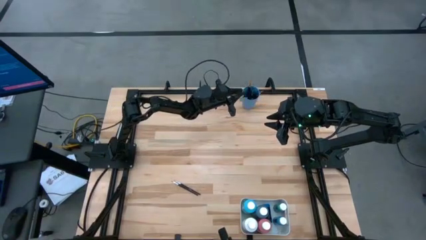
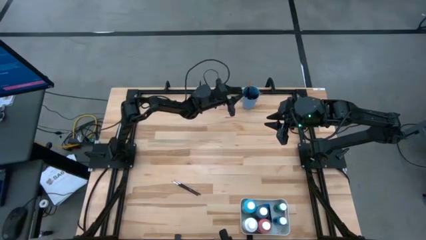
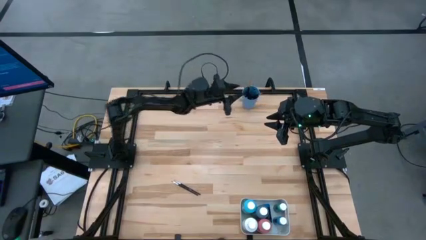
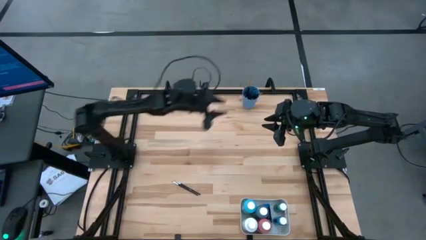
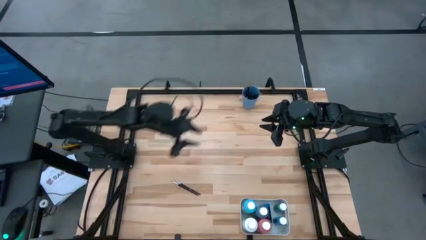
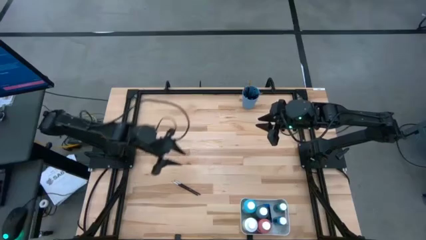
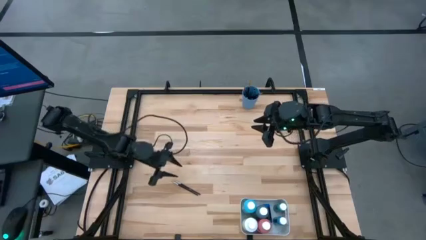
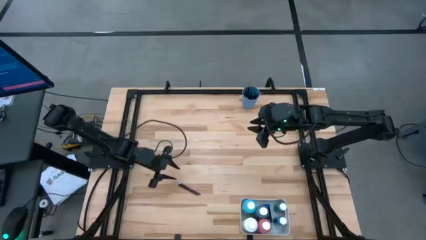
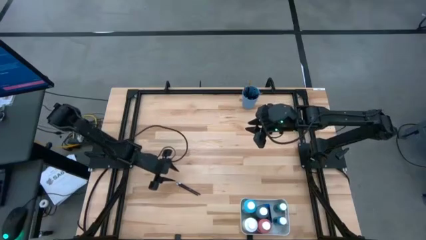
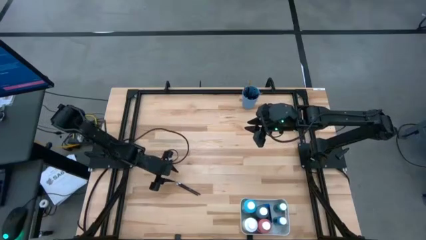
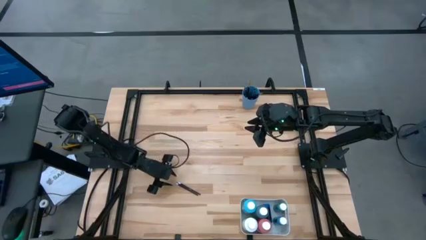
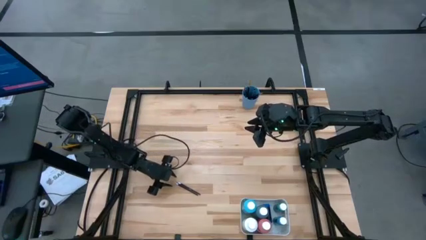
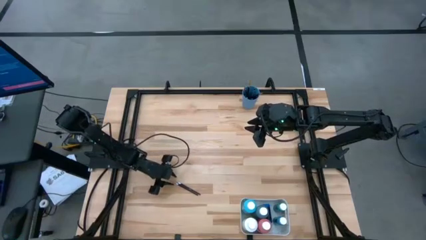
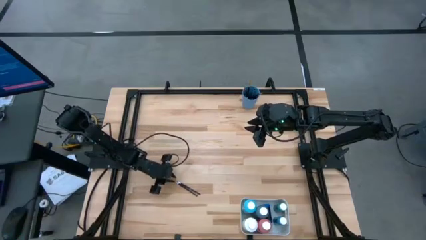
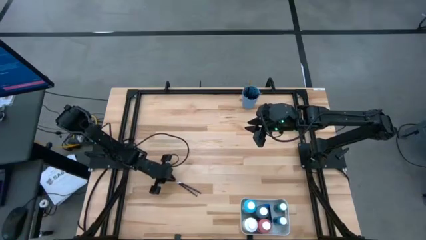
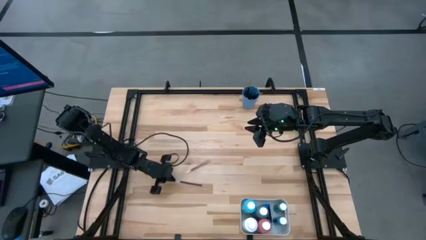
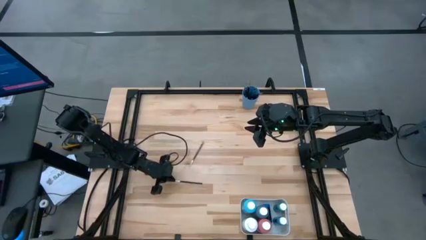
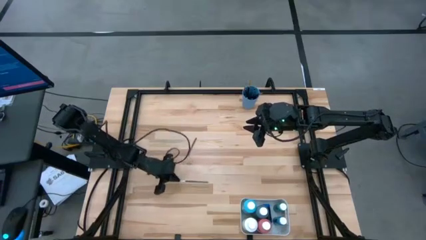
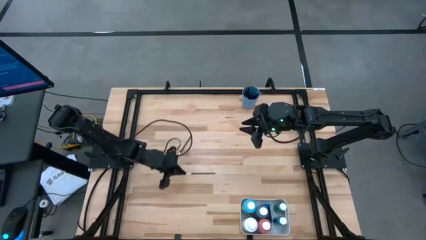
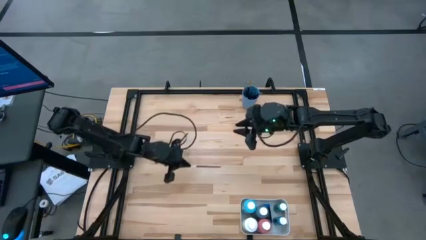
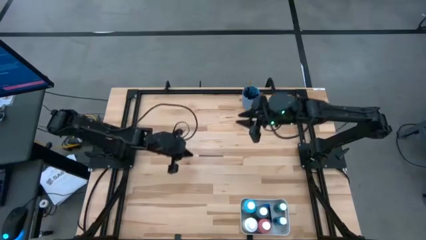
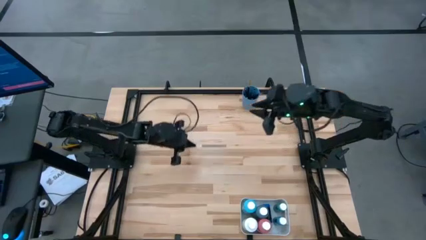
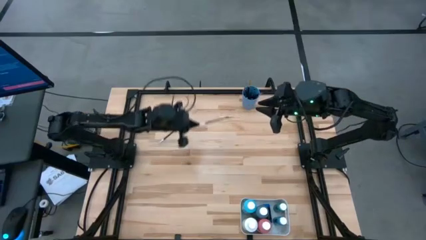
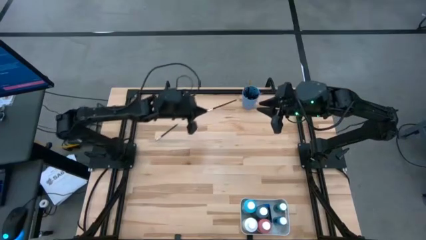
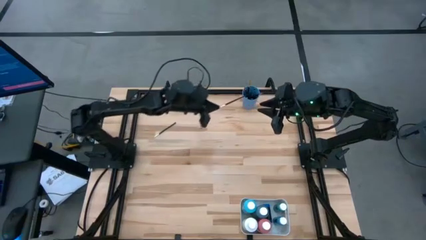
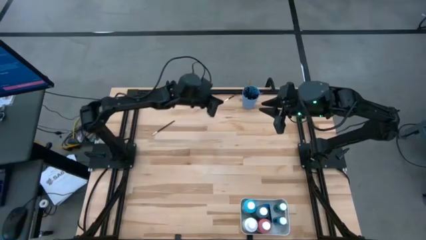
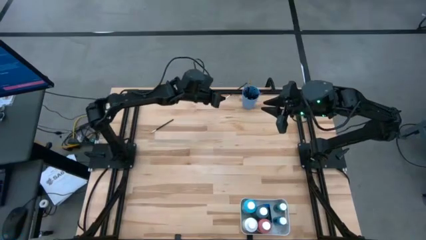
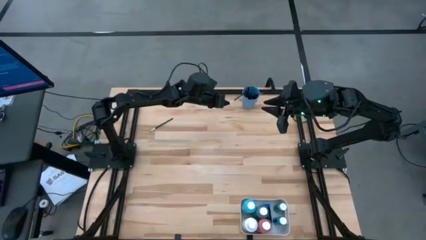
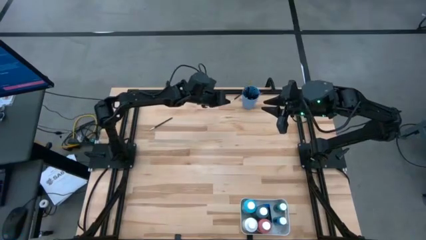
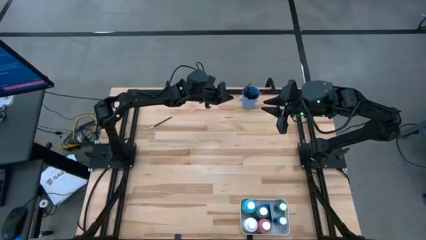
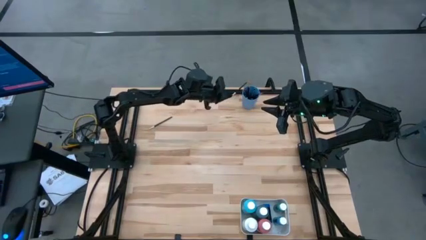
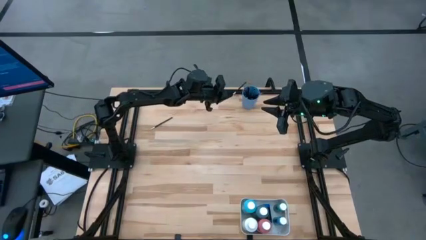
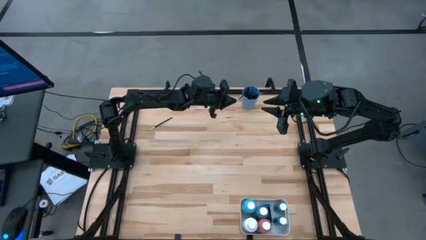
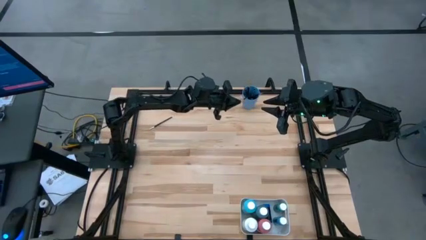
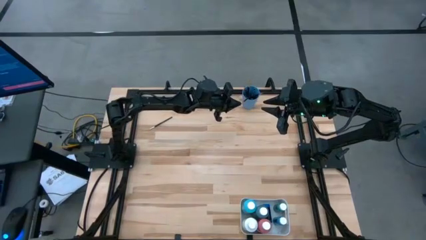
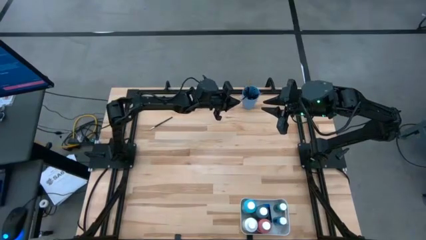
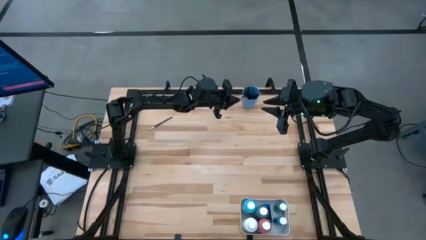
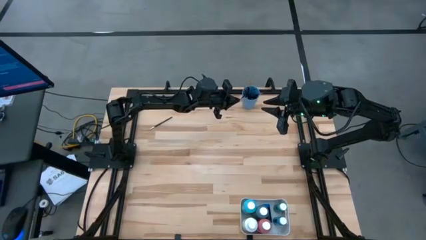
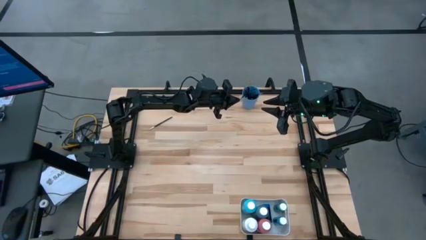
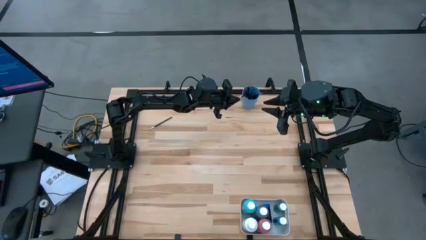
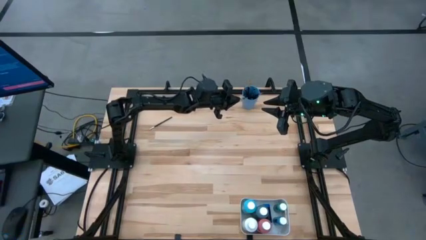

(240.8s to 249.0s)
Task: Pick & Place Paint Supplies
Put the silver paintbrush into the blue cup

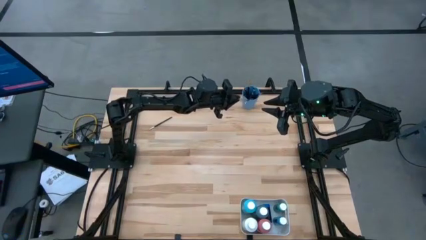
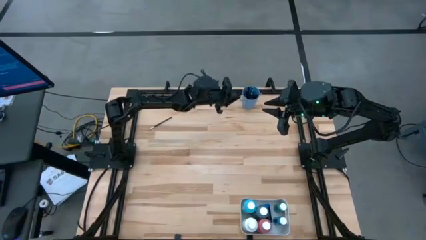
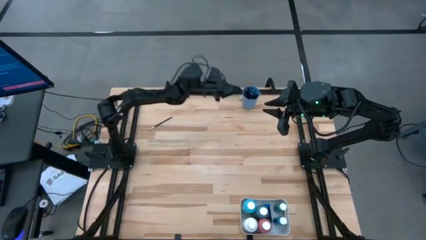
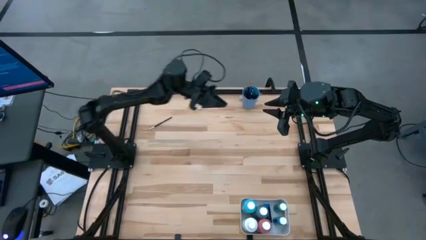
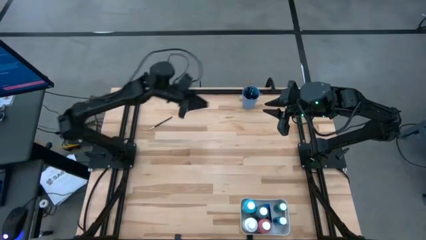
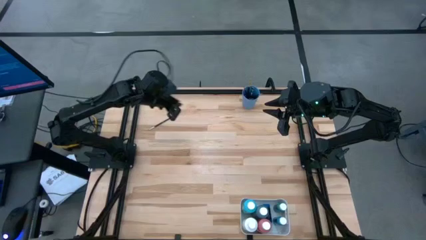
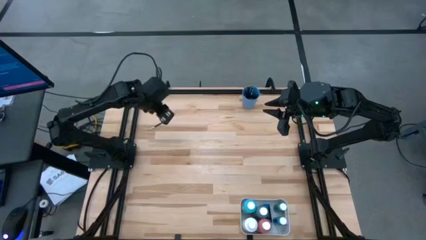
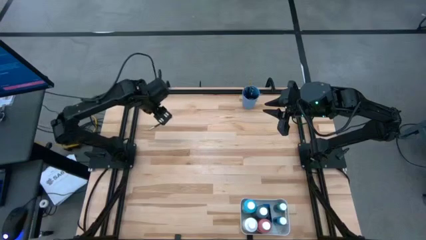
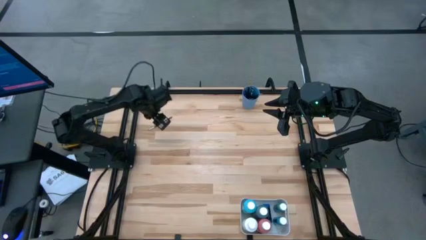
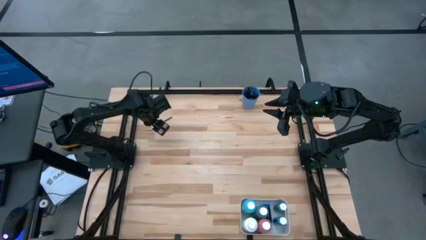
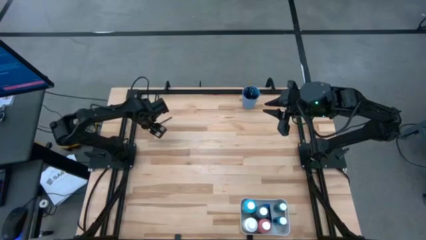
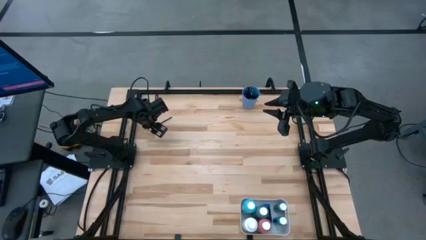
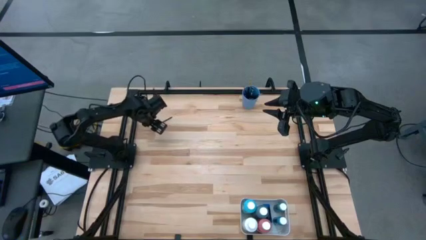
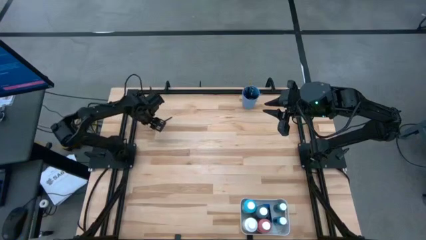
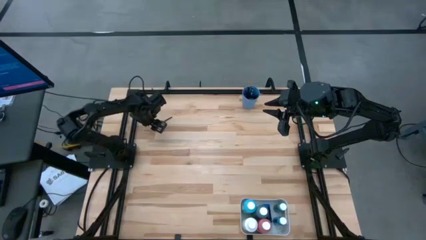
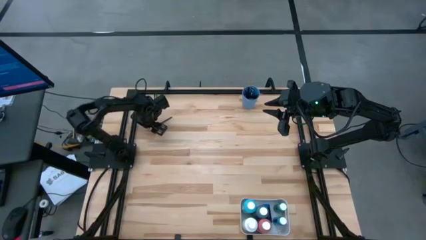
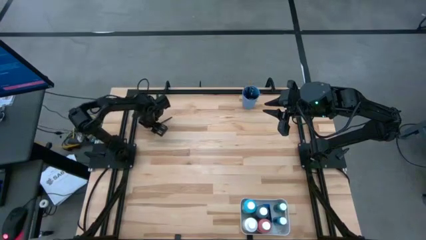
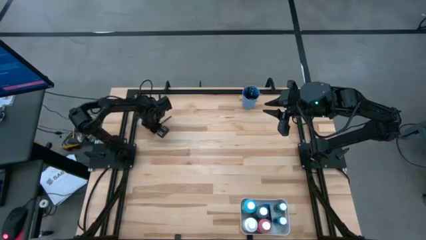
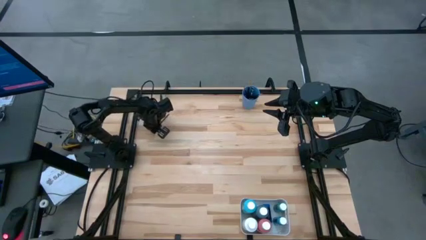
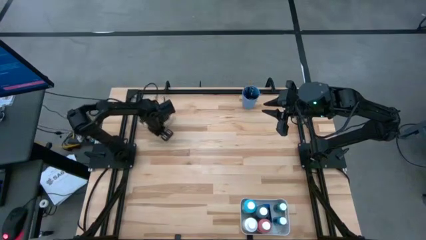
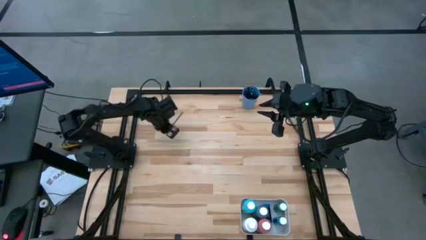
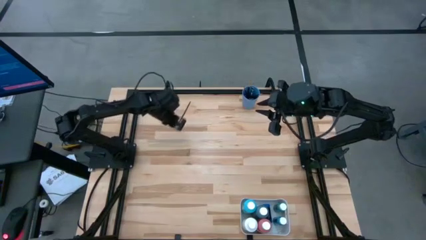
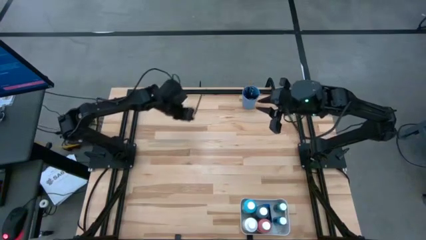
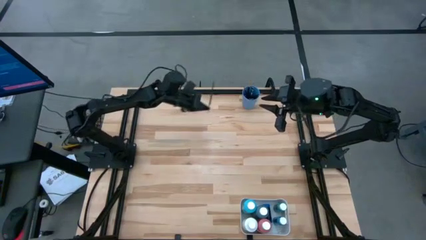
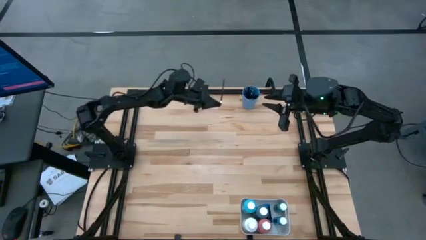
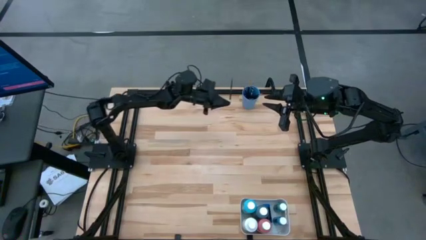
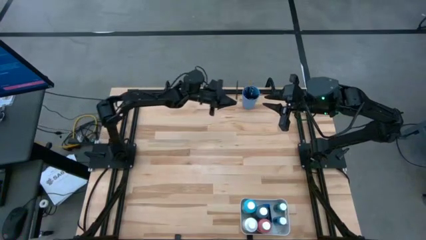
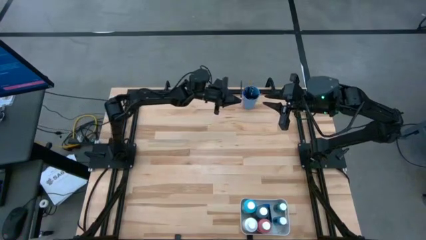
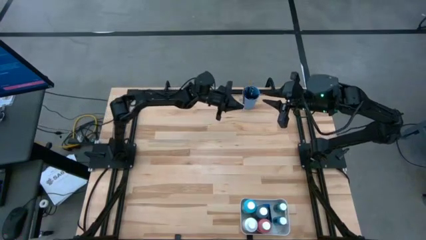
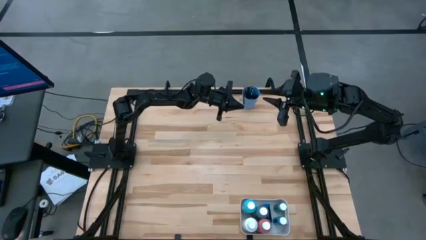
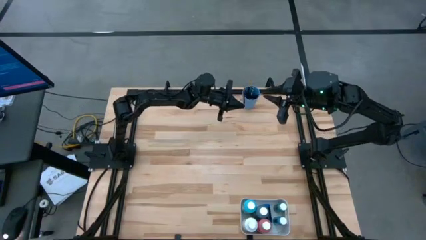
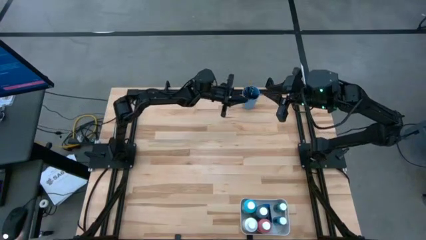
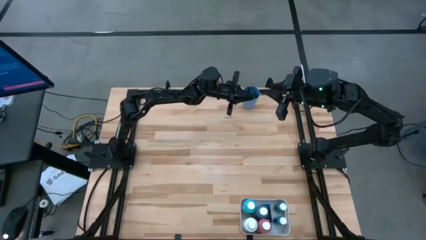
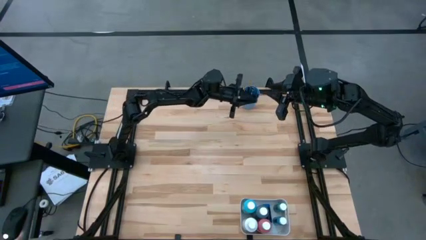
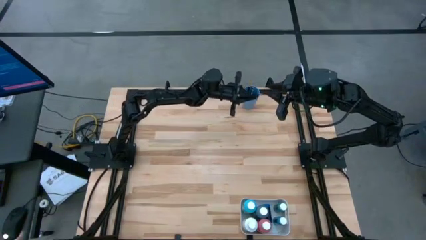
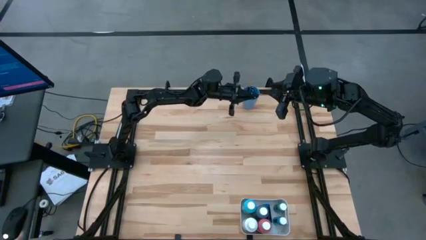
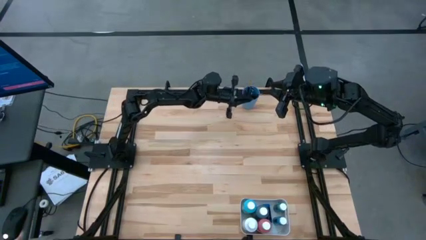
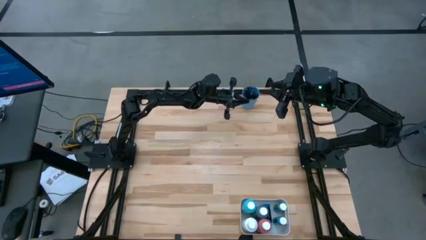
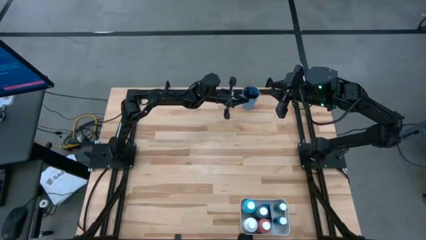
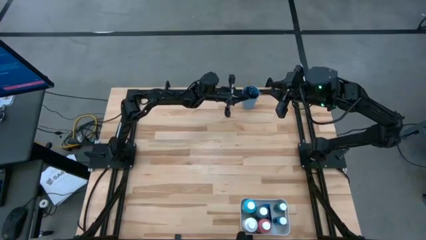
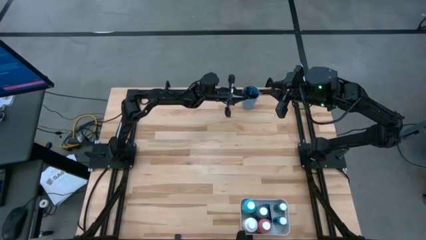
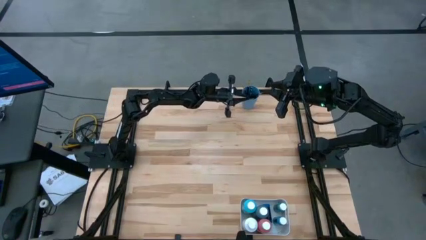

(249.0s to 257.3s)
Put the silver paintbrush into the blue cup
